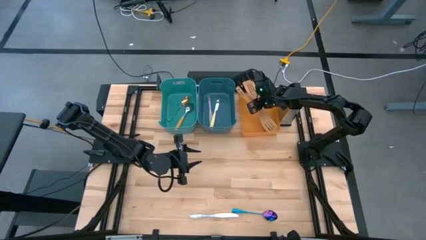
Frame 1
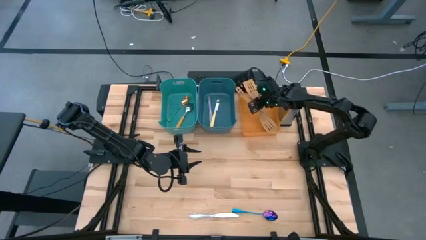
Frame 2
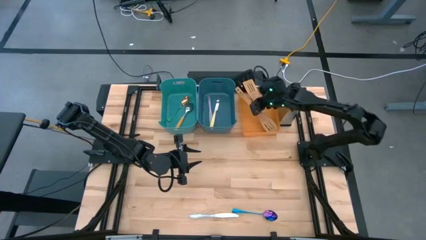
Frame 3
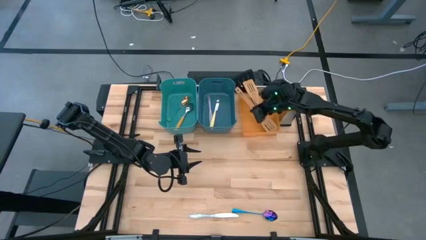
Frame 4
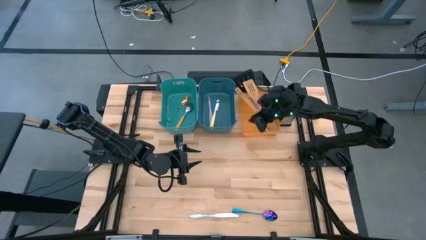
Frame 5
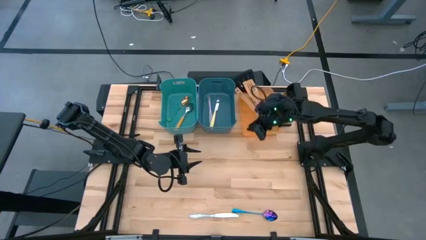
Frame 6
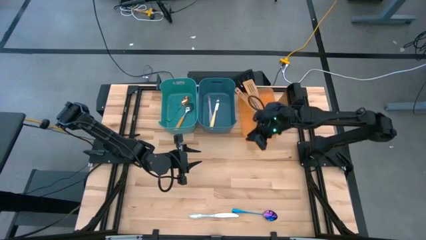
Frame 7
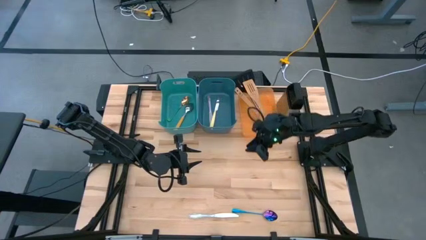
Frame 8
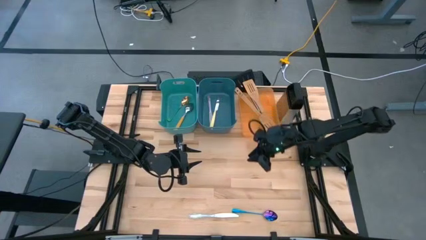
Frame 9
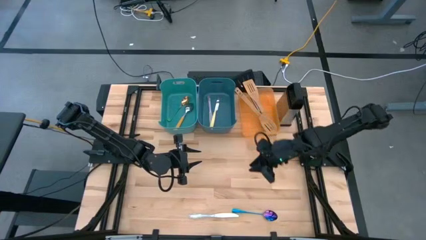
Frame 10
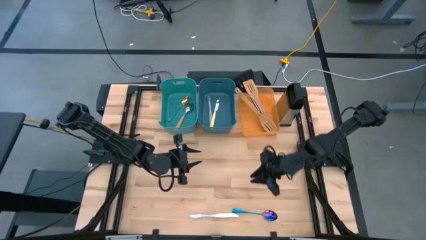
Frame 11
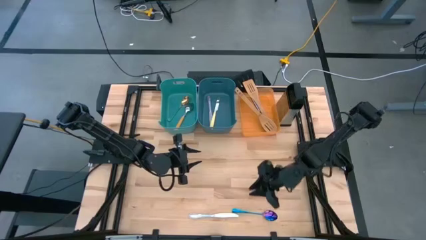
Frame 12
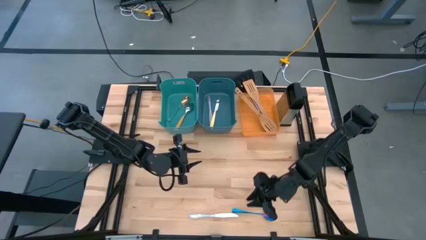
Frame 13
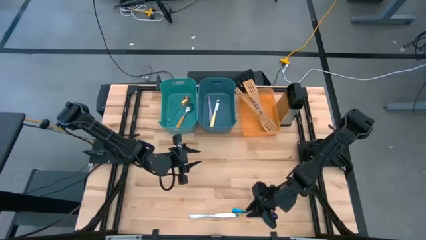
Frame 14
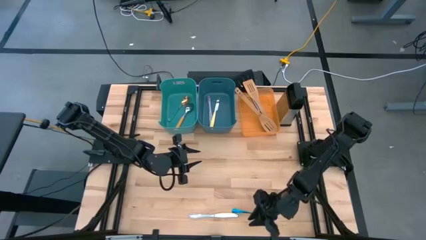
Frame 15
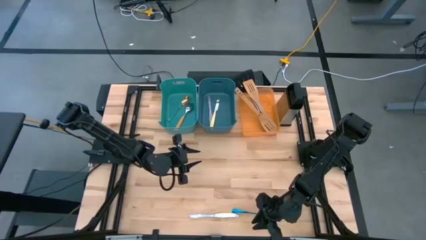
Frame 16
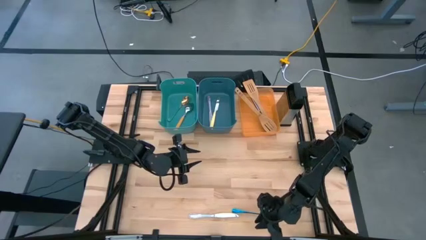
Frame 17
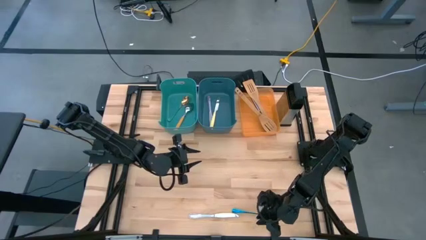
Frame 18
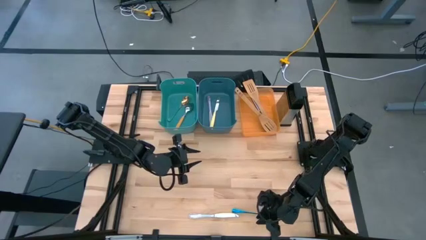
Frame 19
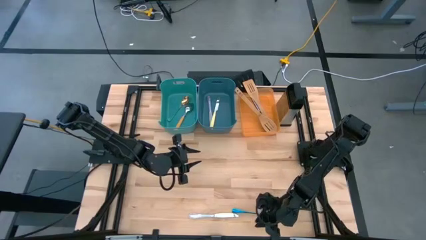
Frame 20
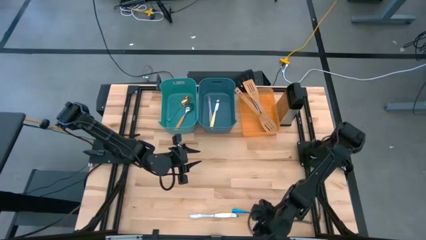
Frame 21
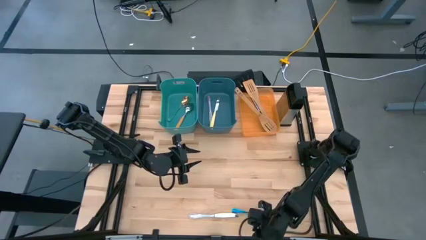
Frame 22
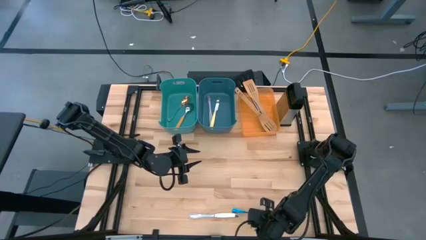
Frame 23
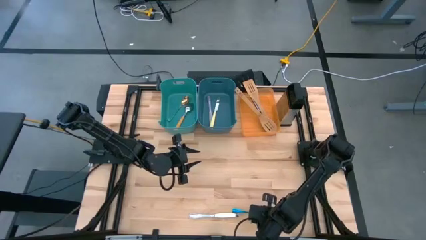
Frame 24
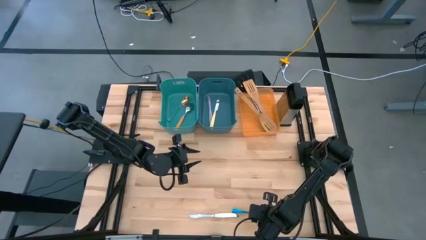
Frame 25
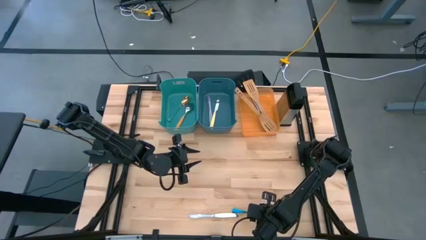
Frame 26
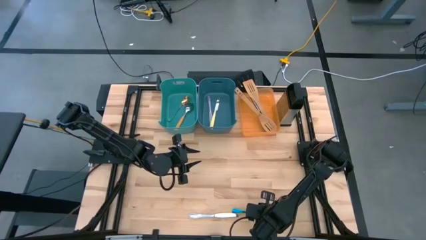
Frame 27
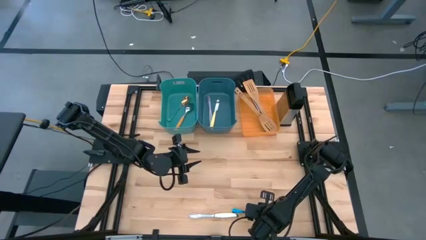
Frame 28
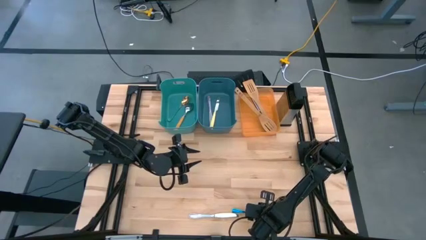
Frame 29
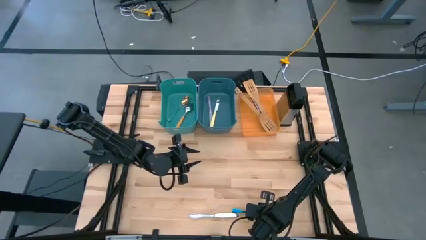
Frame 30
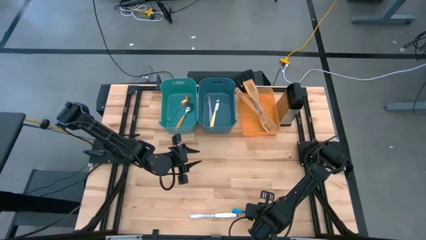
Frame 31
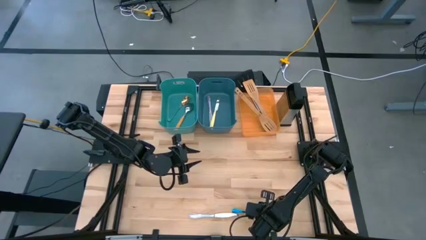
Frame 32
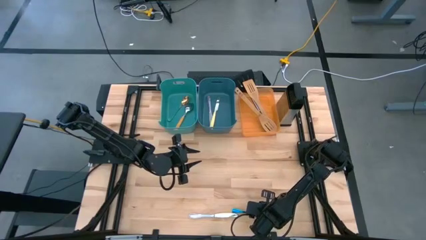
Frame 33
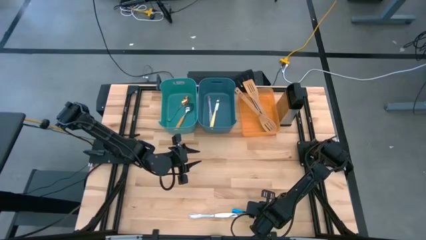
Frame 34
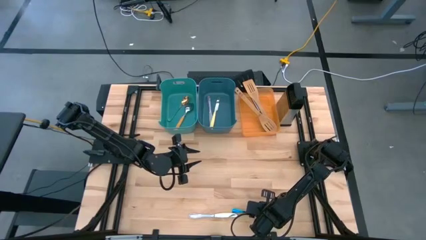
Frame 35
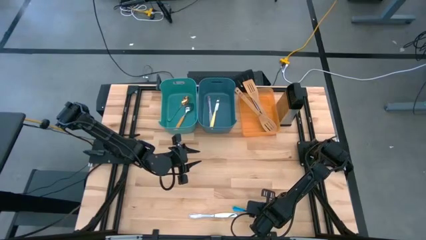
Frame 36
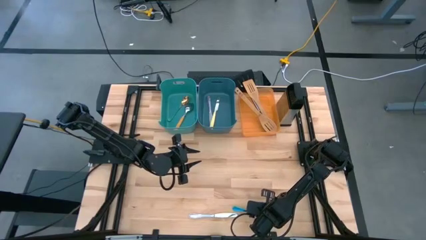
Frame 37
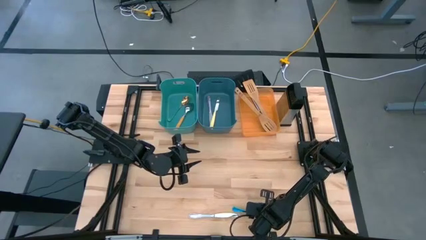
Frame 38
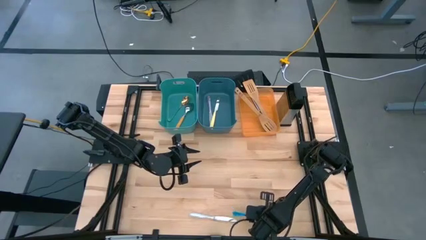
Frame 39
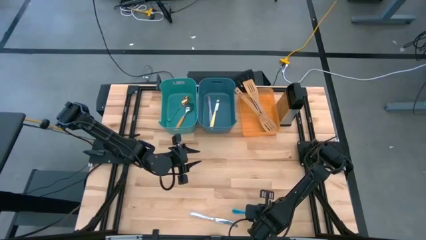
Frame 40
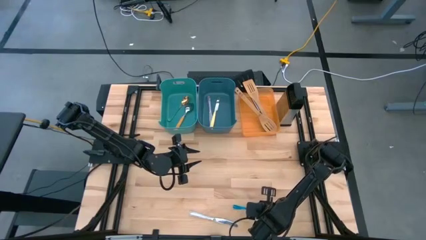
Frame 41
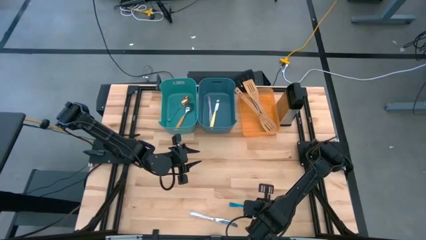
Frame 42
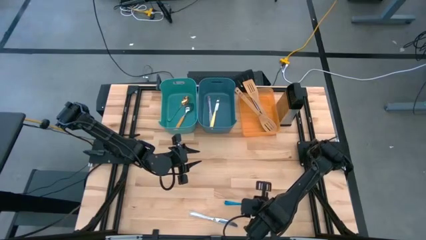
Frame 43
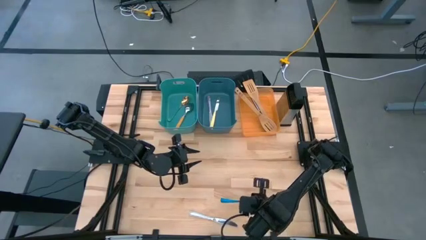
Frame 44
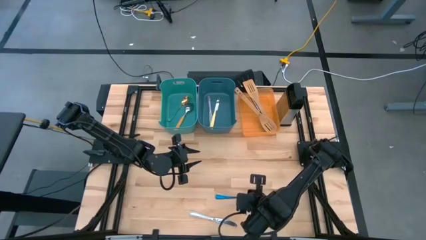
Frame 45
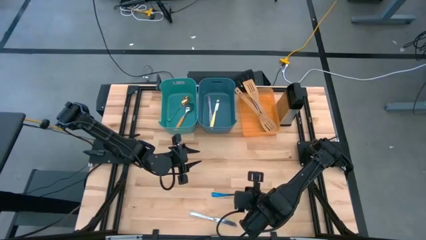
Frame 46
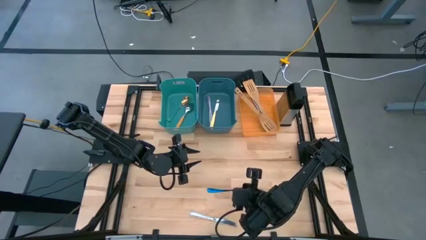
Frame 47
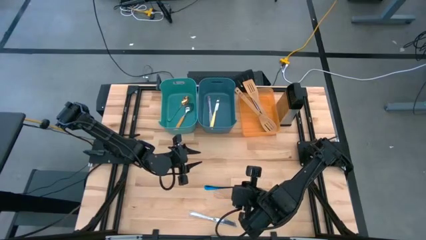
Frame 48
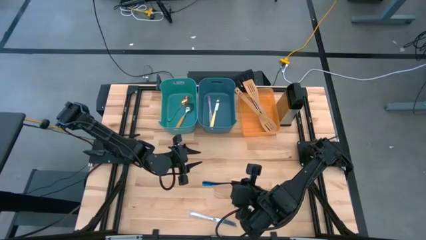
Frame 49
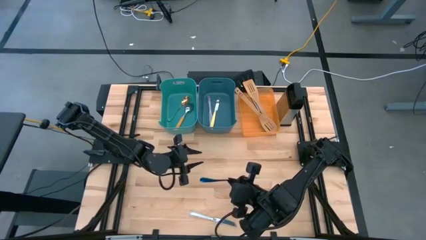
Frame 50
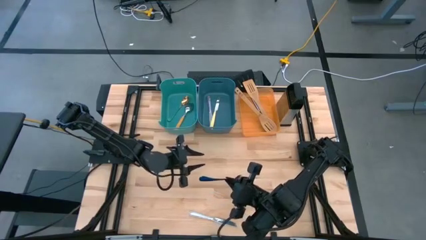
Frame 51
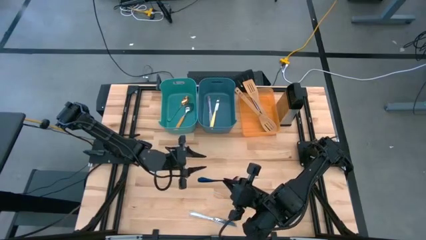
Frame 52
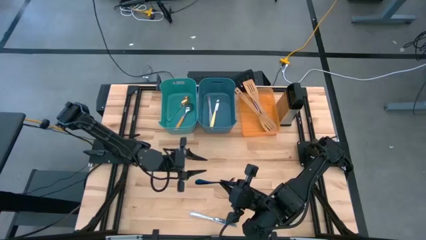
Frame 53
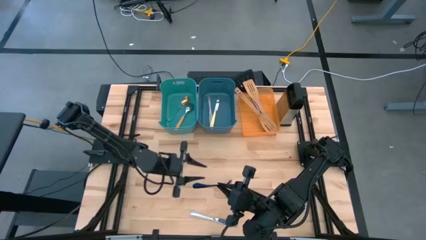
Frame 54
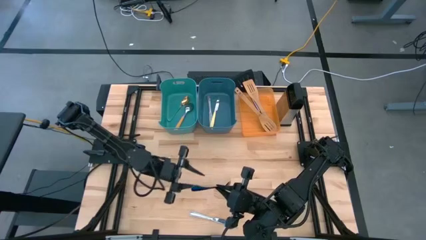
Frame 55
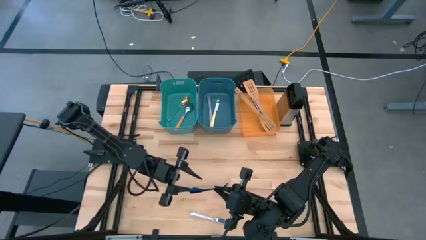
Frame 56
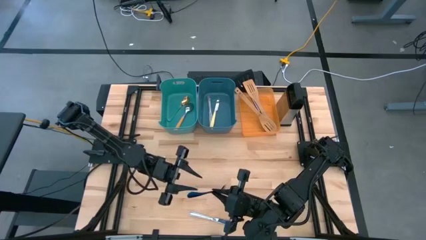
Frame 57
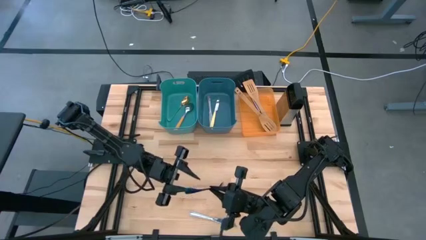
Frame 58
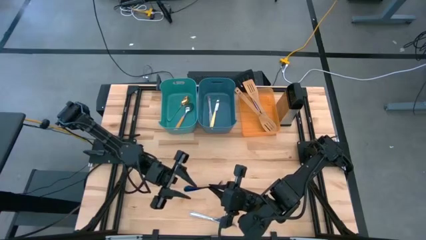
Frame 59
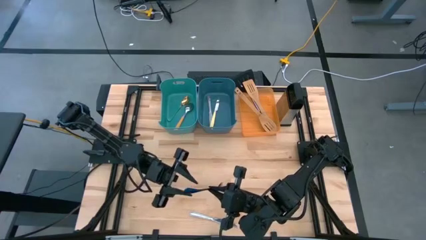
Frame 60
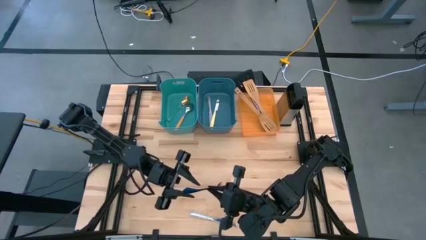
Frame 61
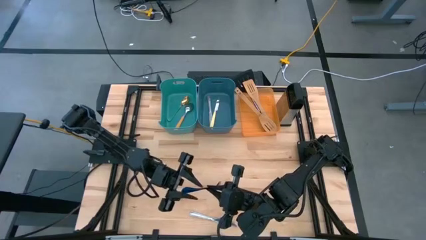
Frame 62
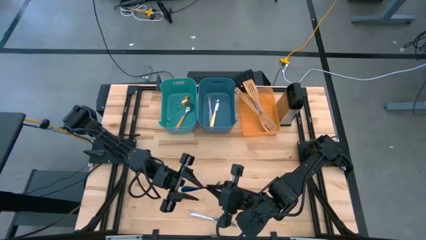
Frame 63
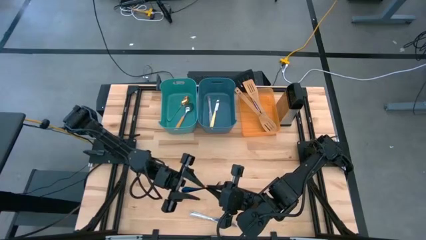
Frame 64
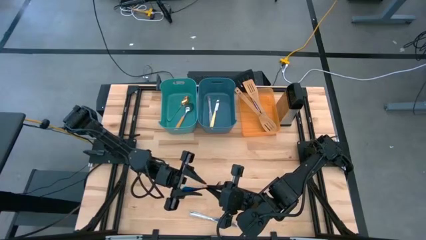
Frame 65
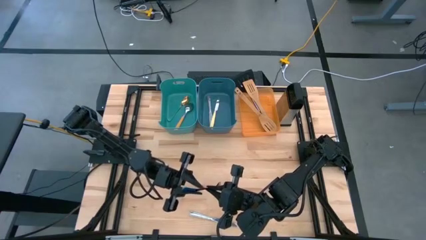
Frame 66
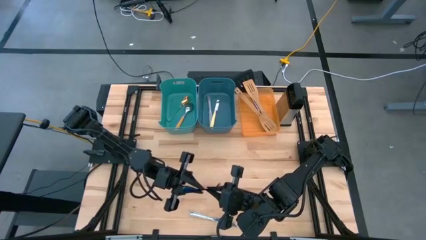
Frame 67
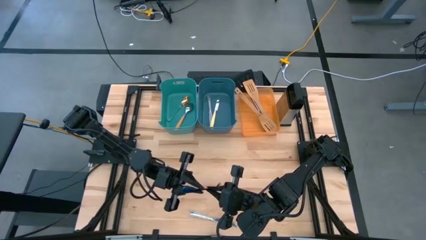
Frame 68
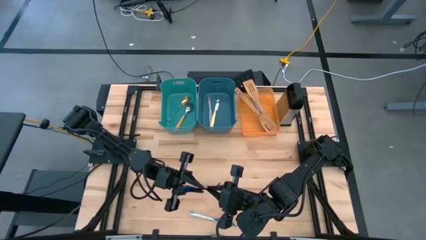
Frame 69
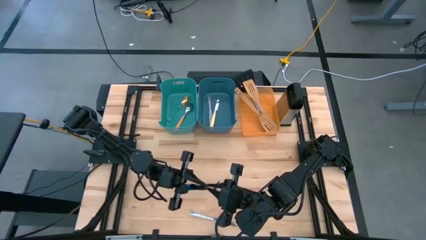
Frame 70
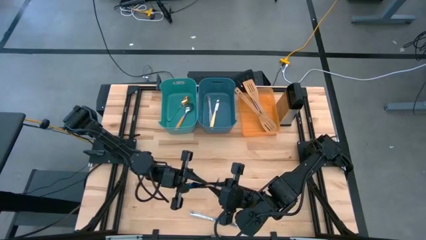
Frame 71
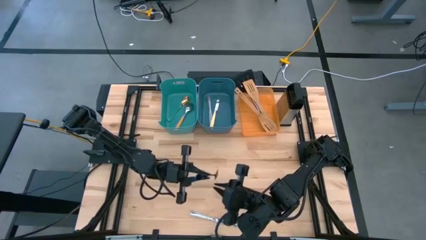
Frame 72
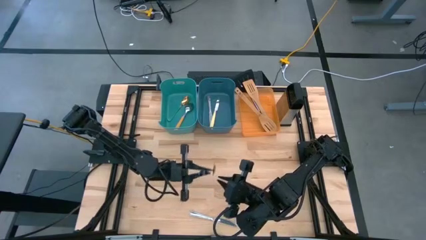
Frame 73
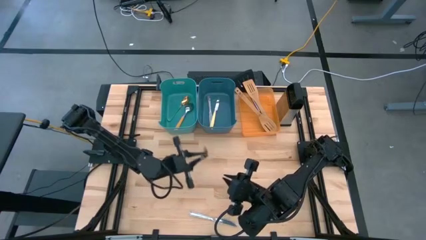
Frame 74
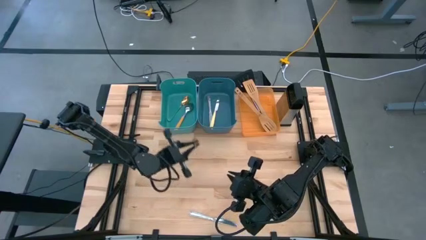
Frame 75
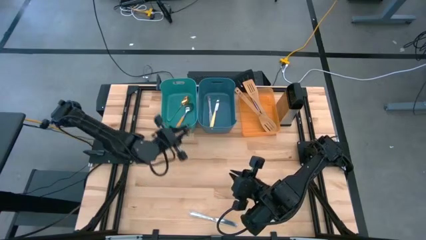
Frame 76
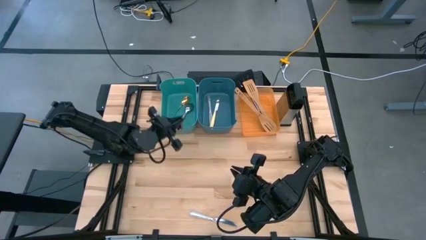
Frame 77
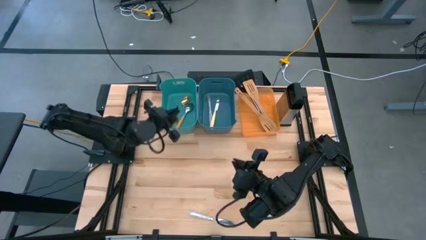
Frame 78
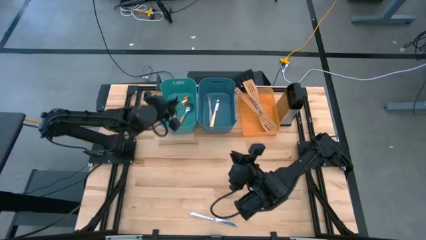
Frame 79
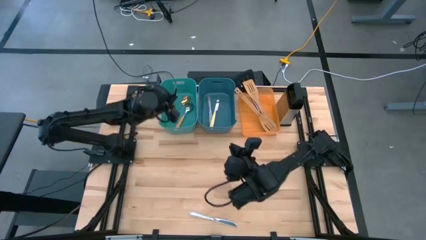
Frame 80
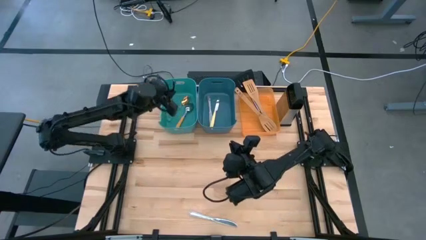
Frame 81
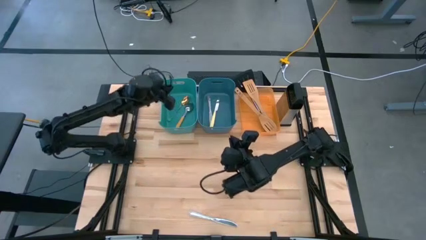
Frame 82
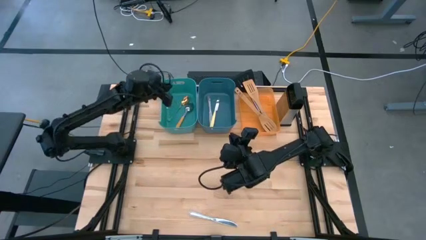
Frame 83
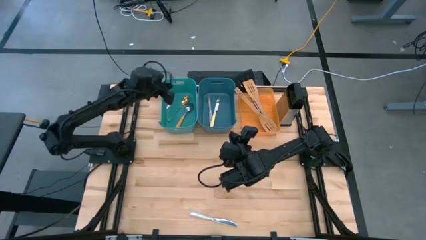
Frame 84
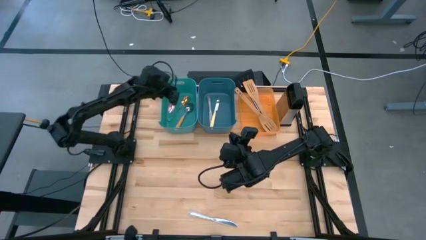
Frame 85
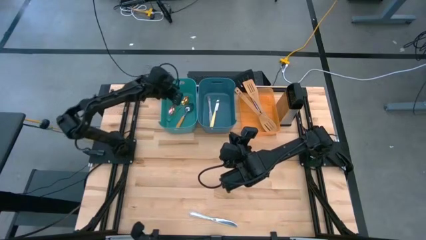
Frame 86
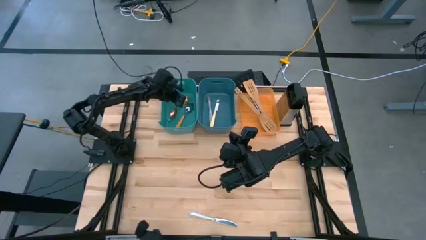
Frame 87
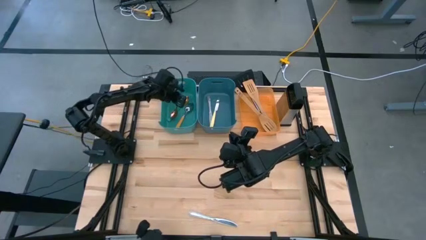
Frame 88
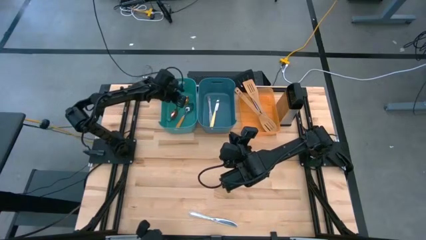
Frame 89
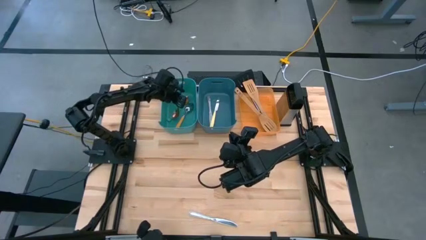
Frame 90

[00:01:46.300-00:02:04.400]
Task: Pick & Place Kitchen Items
Put the blue spoon into the green bin
